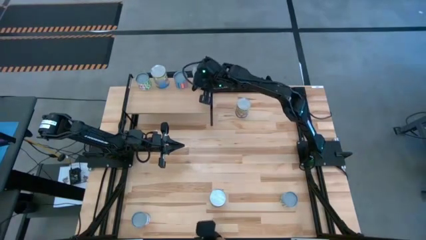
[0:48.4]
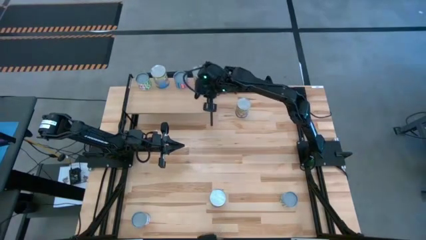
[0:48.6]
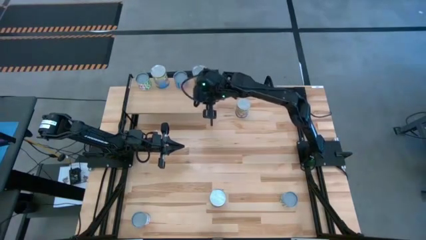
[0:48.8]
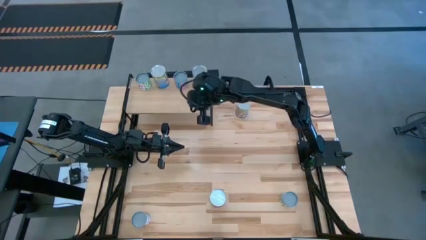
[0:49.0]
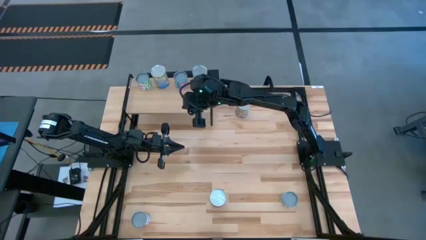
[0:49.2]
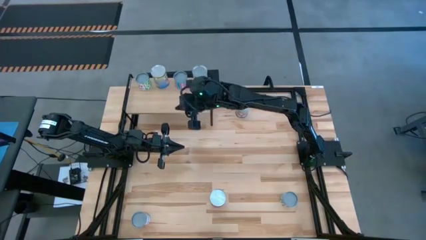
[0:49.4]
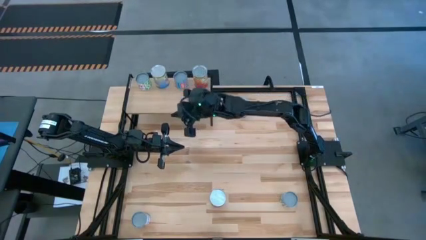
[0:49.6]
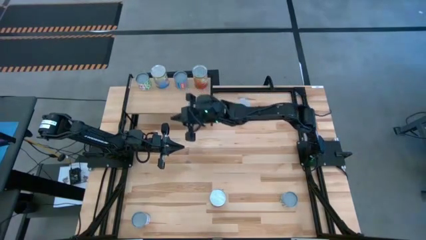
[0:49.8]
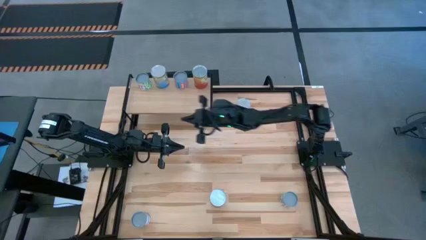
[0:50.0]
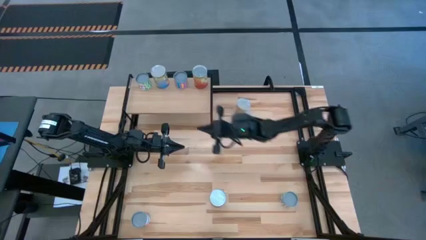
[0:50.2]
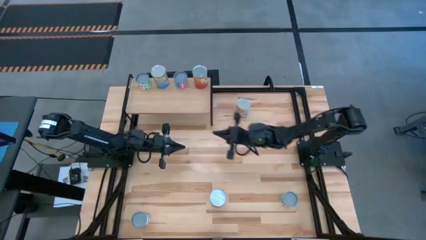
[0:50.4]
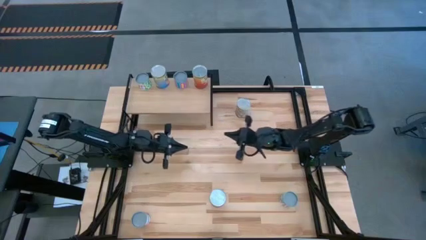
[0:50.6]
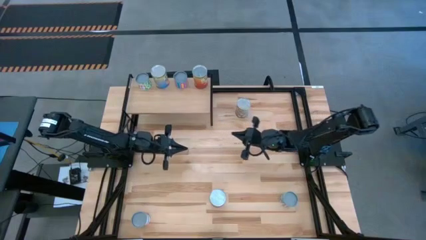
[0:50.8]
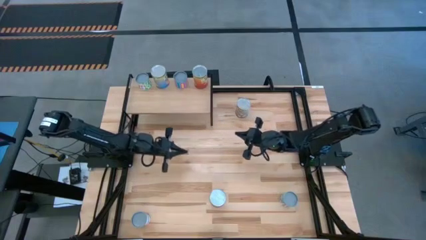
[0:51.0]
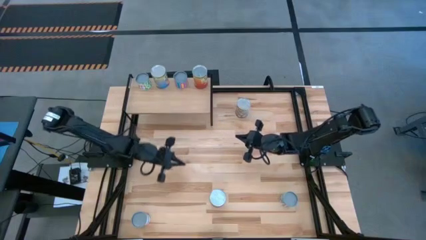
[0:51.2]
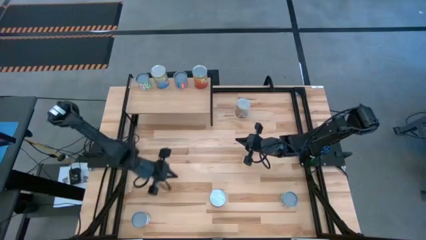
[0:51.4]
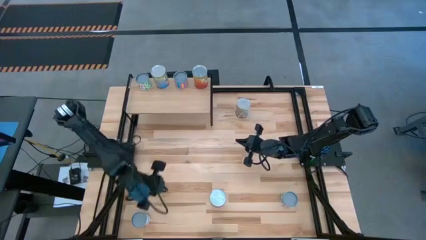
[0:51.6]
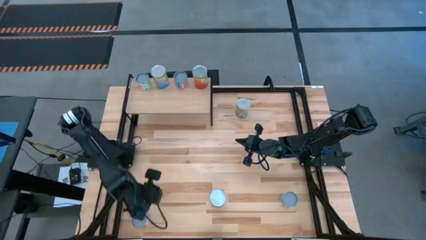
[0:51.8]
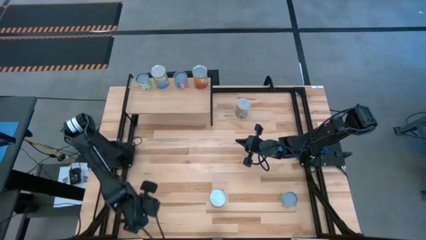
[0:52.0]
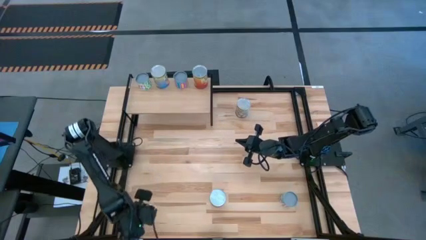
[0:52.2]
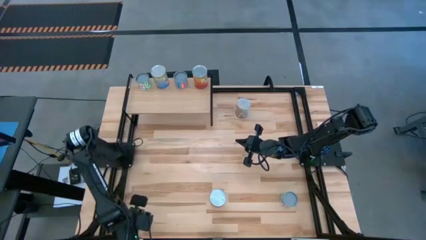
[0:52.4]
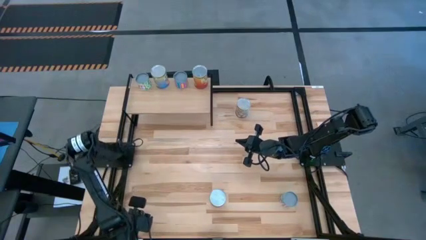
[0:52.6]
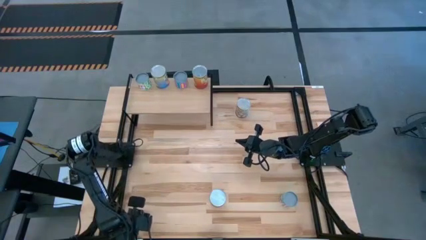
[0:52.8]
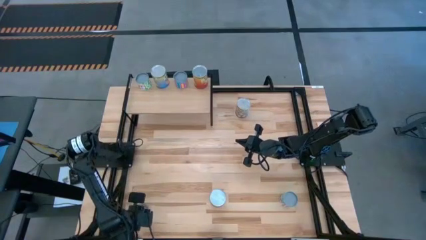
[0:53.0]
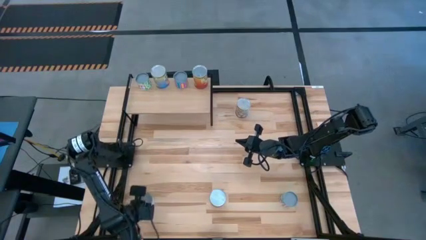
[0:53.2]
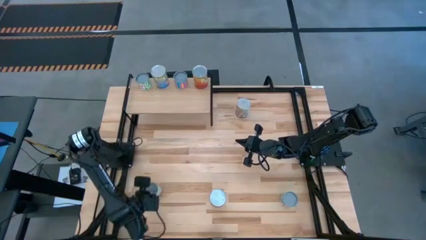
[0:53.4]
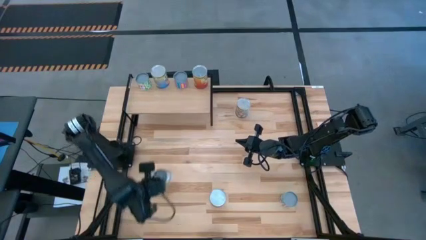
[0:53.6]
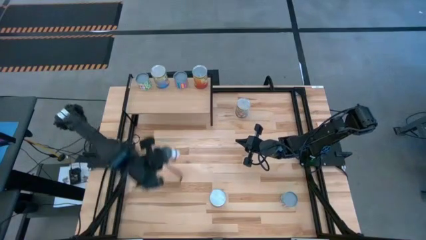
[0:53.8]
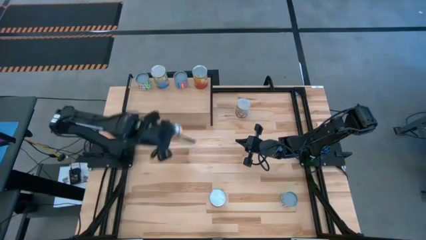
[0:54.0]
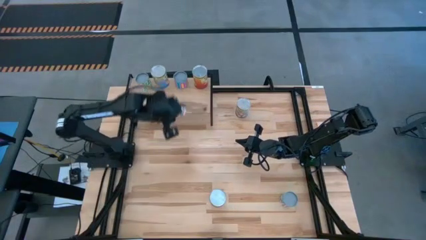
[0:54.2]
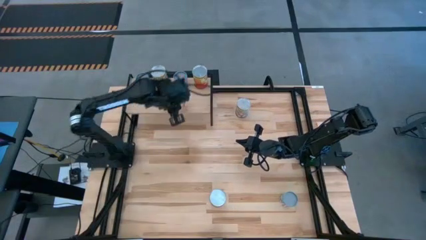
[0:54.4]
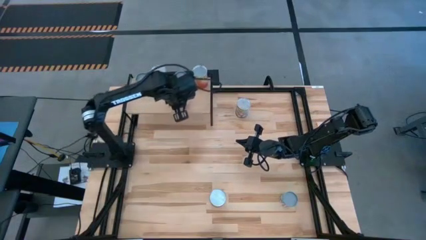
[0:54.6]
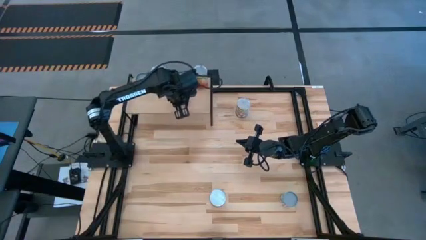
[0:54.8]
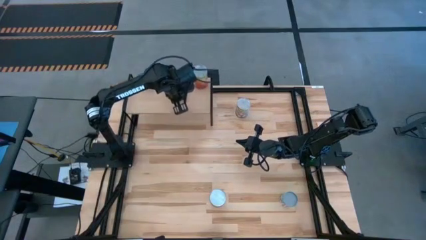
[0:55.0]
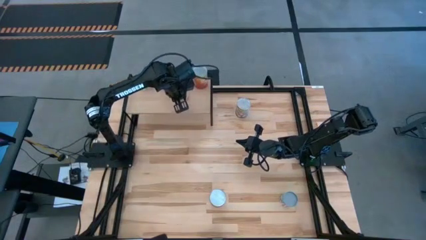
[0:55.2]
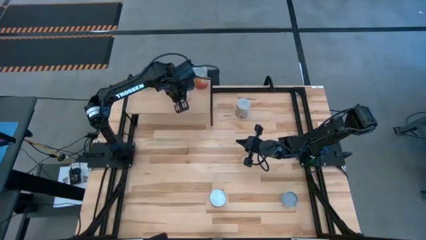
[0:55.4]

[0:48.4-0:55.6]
Task: Pick and place cans onto a shelf
Put the green can on the shelf aligned with the other red can

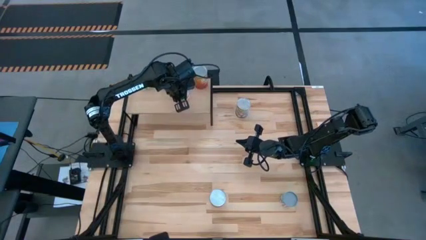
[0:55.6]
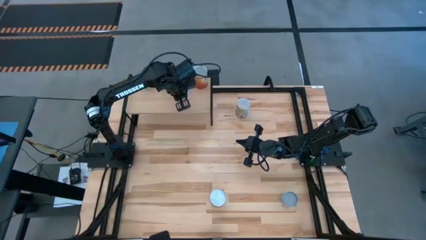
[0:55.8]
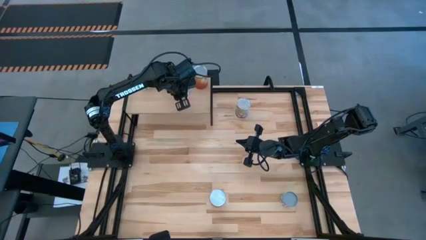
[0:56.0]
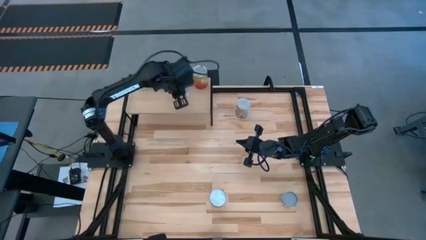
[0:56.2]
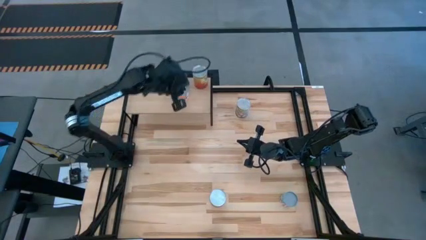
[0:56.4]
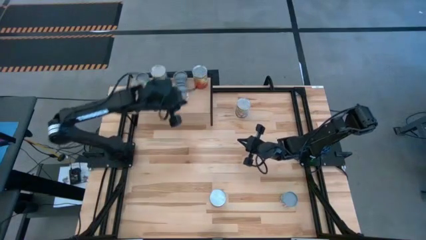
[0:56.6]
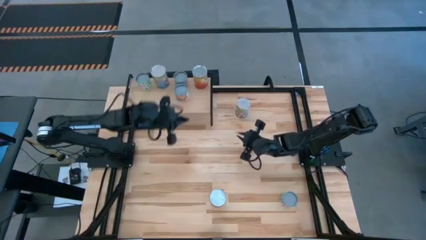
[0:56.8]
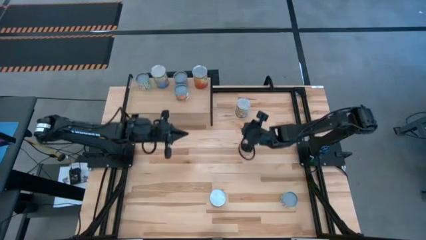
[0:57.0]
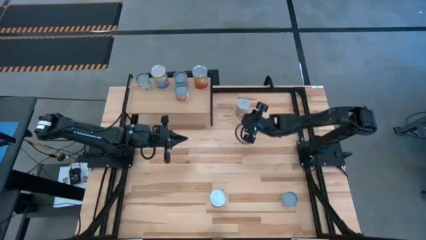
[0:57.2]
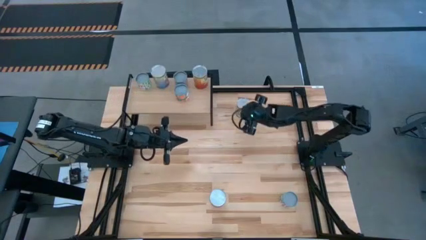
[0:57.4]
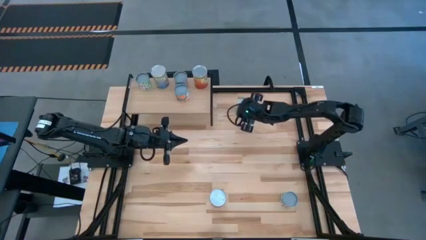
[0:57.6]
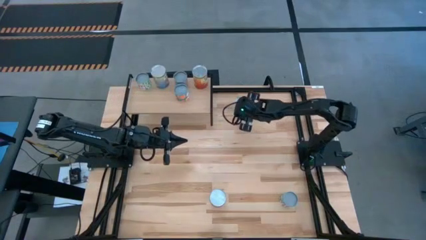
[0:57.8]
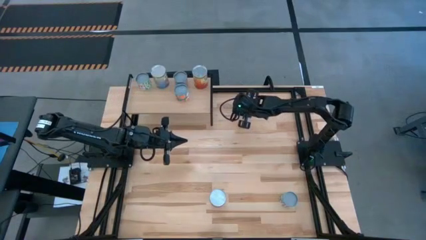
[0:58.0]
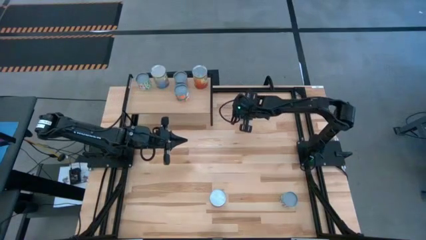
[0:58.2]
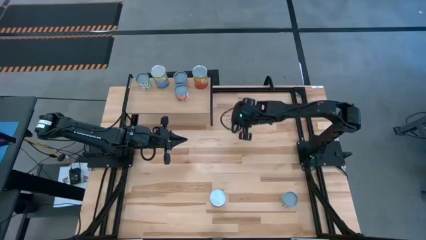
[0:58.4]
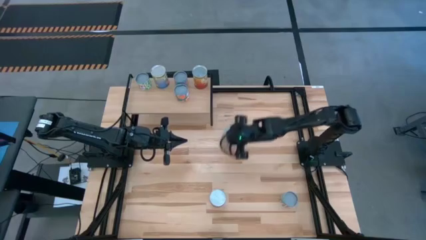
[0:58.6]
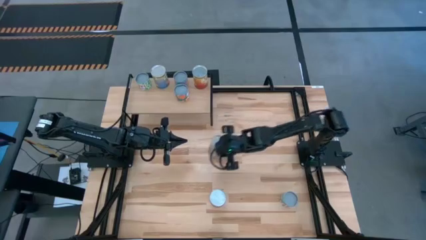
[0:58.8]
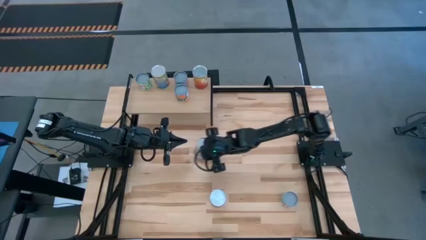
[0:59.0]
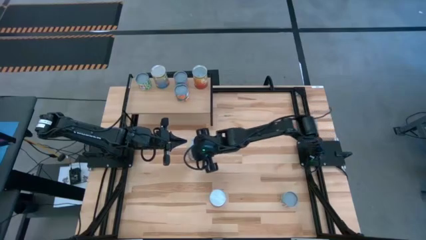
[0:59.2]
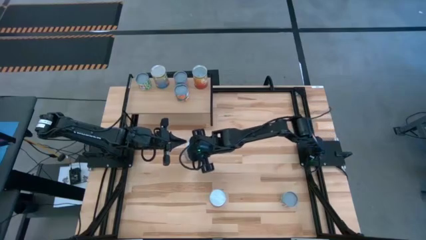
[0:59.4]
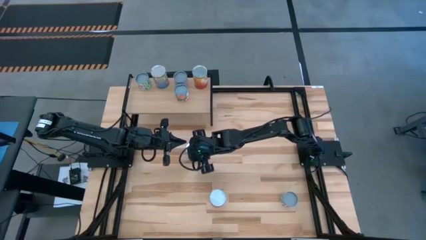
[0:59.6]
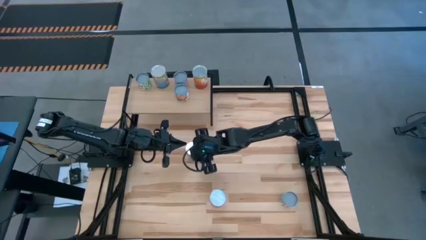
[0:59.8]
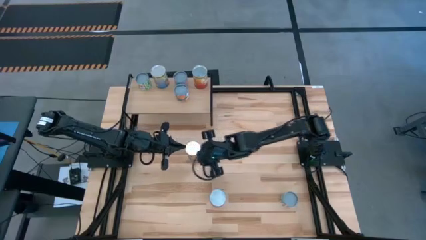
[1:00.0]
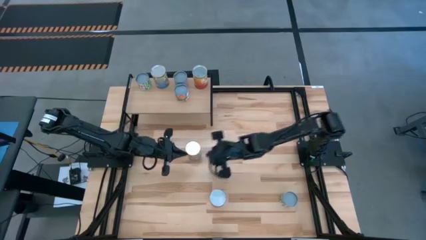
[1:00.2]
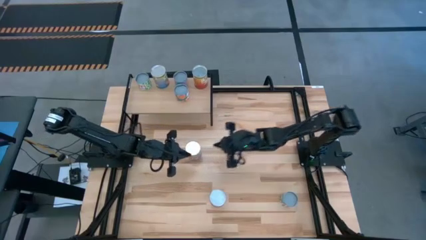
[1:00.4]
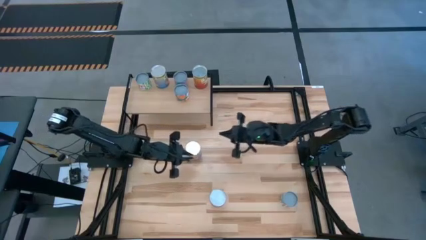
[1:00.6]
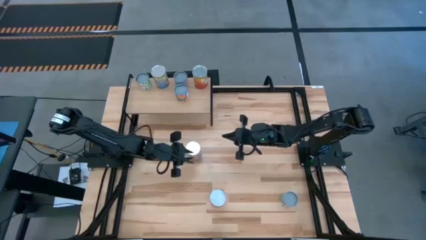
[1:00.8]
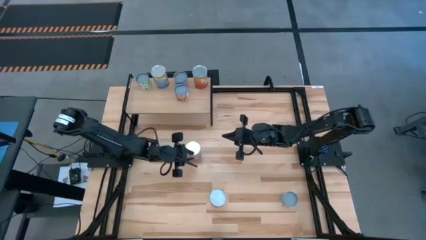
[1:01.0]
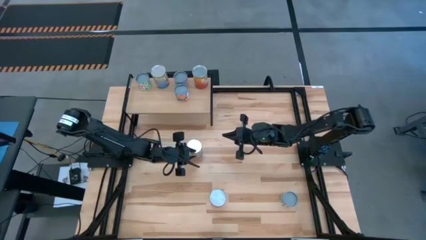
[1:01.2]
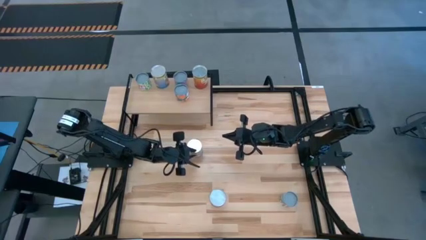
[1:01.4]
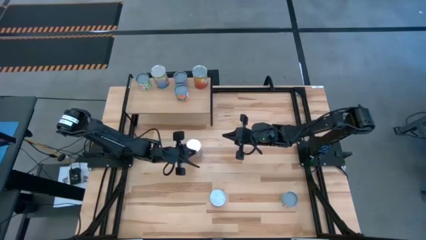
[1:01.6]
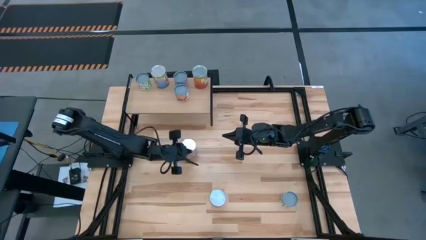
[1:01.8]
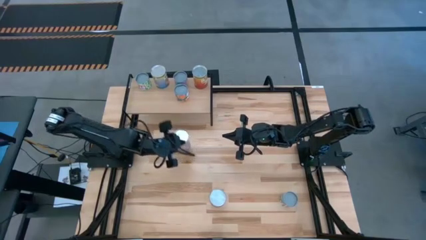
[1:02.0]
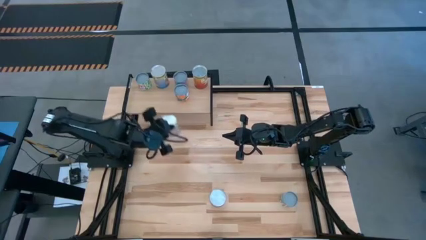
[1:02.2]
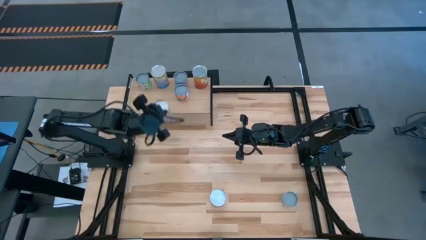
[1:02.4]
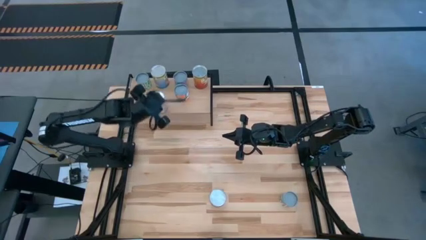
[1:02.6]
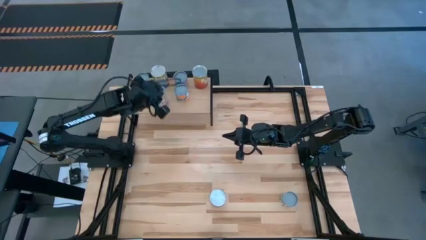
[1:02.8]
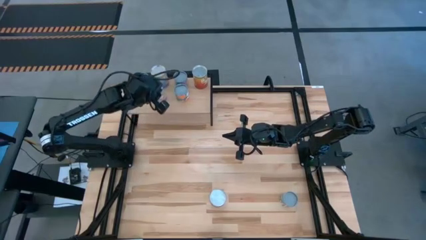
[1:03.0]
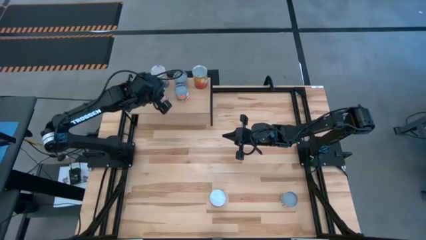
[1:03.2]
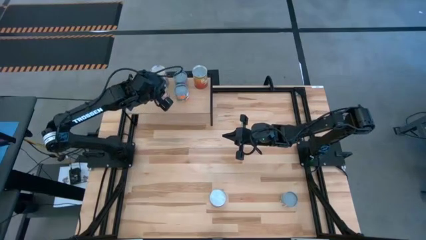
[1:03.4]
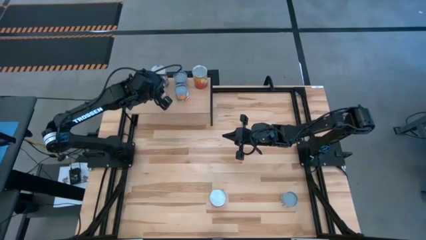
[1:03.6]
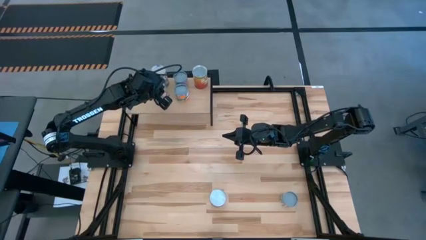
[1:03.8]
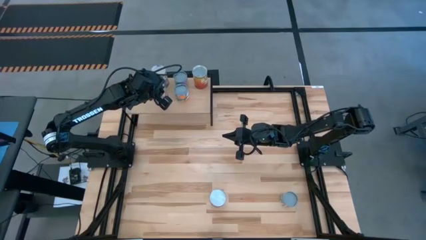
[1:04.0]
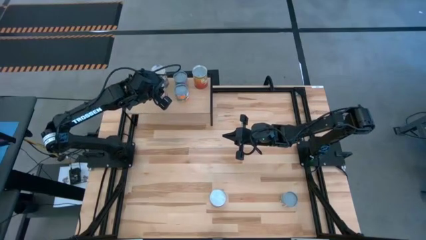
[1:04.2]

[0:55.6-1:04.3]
Put the light blue can on the shelf aligned with the other light blue can
